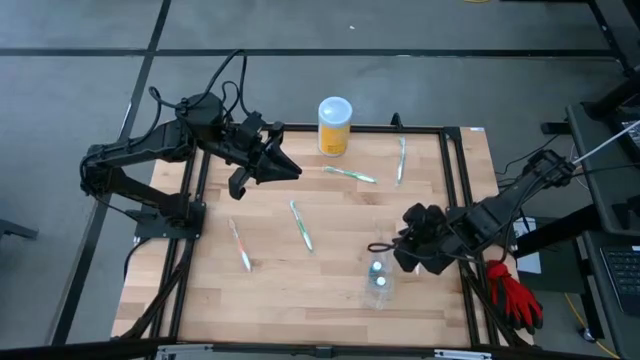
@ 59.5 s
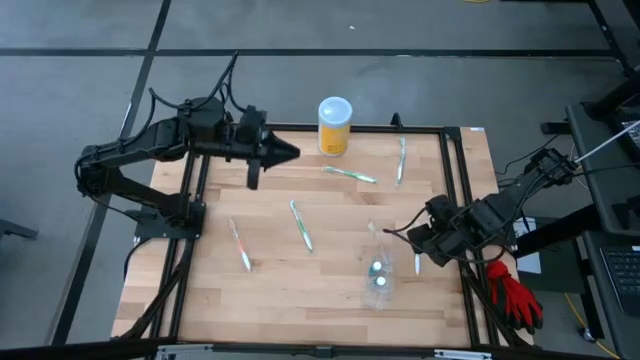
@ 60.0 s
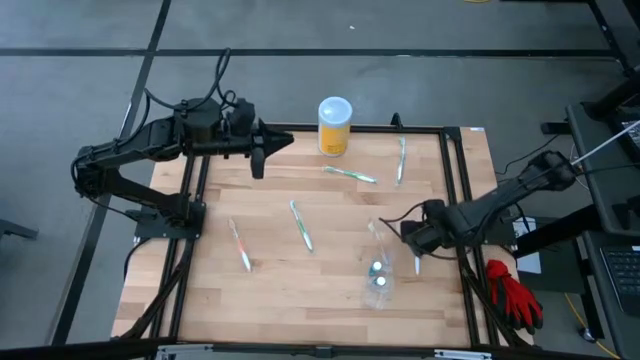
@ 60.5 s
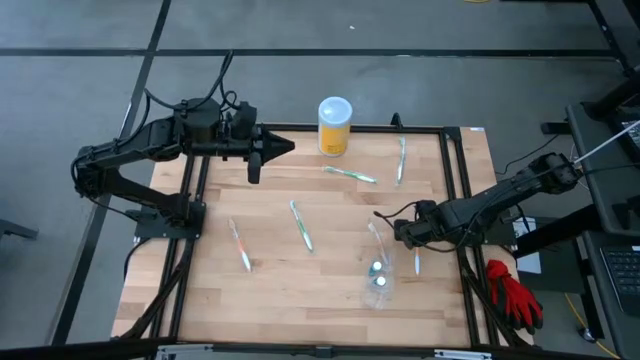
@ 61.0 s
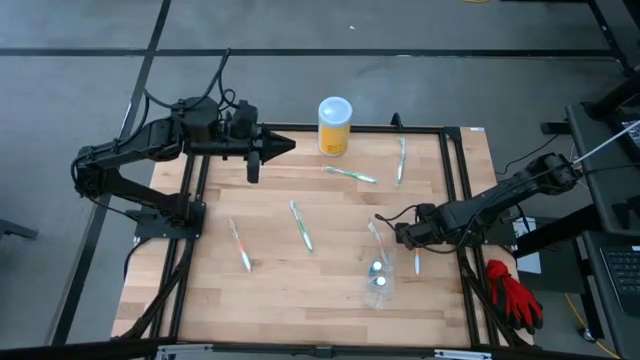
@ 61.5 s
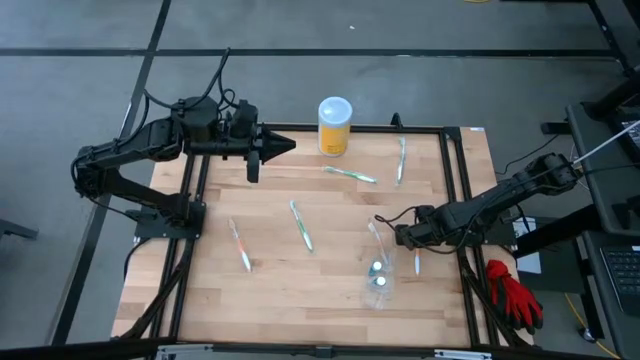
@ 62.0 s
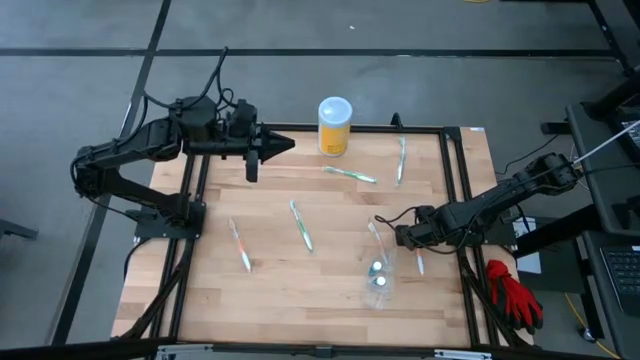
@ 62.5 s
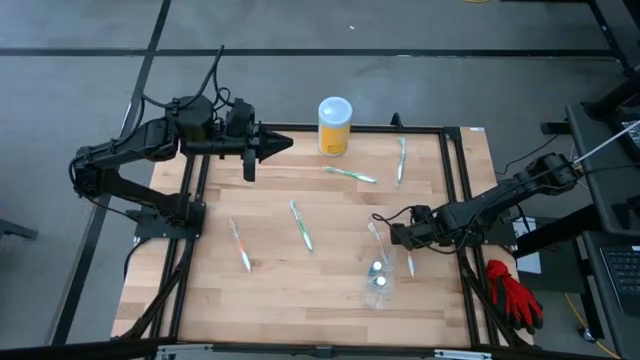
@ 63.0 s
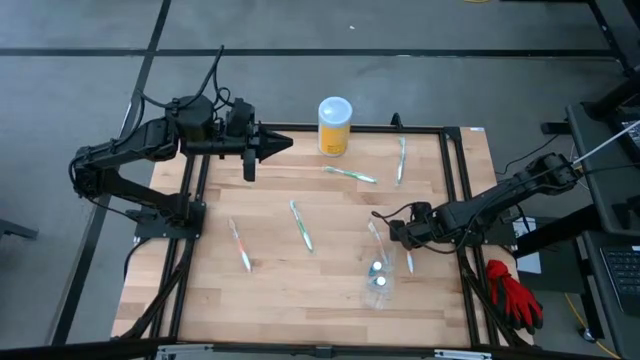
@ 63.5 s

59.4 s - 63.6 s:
Task: Pick & Place toothbrushing station
Put the right orange toothbrush into the transparent organizer

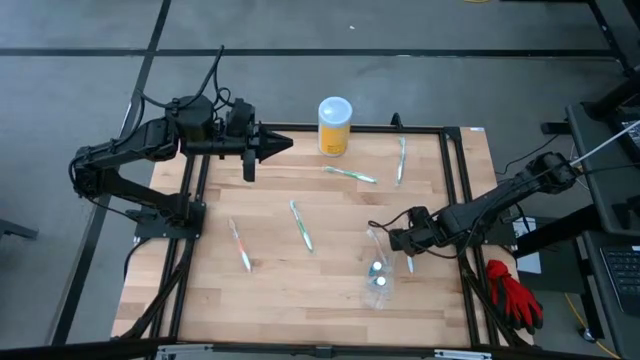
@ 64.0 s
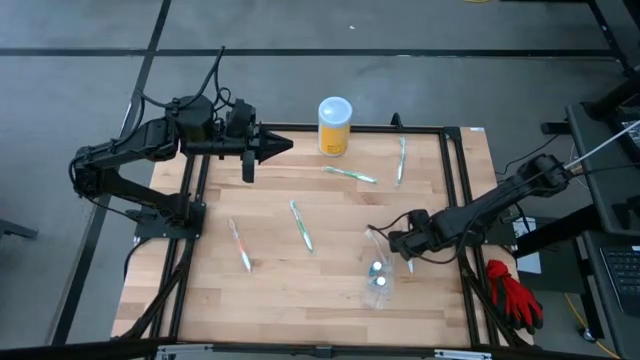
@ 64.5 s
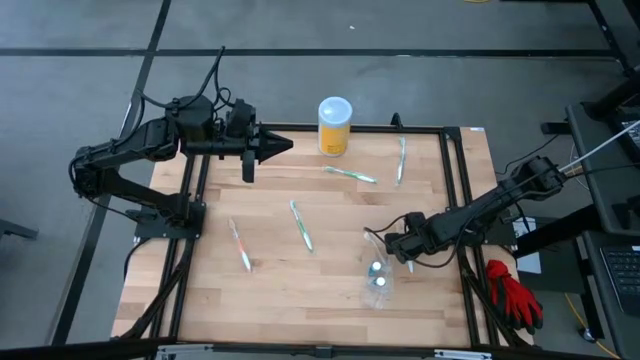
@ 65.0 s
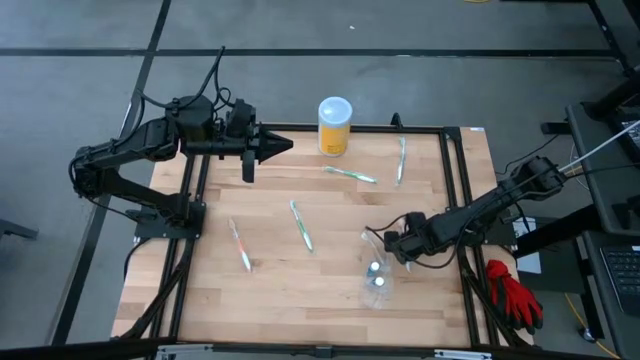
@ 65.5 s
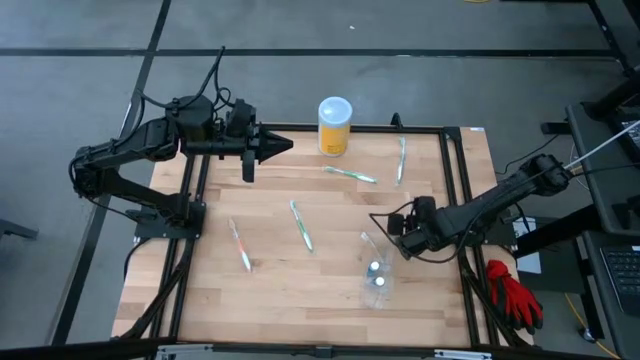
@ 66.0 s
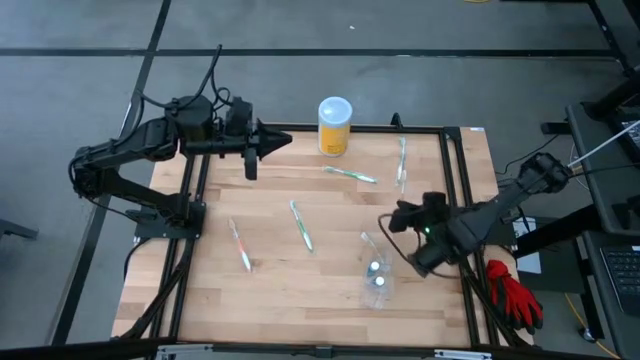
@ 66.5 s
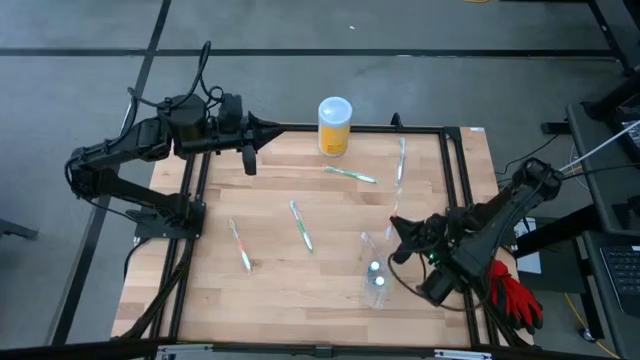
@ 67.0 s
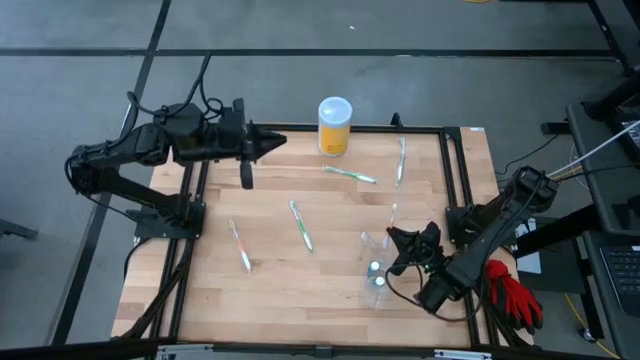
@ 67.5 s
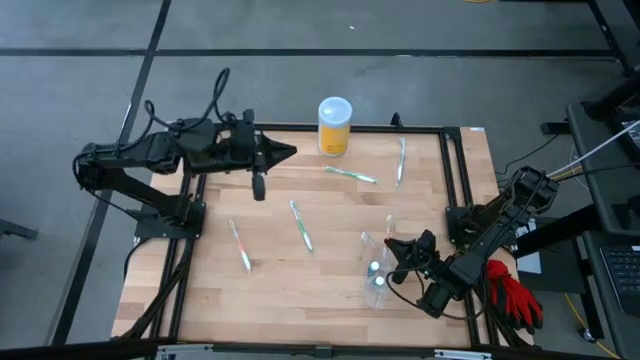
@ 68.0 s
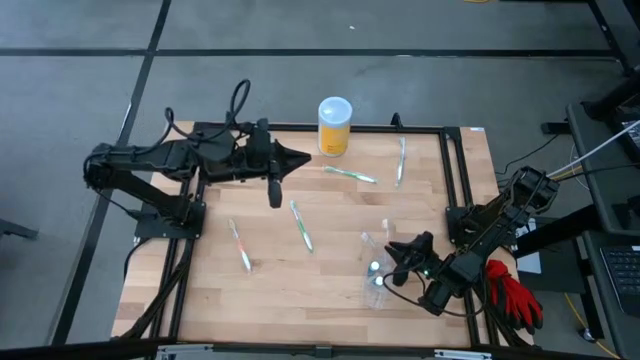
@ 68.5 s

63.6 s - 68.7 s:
Put the right orange toothbrush into the transparent organizer

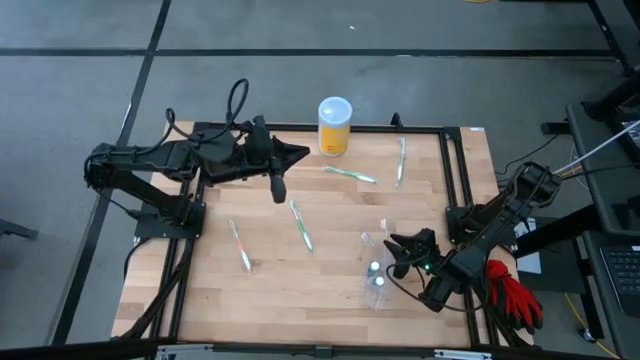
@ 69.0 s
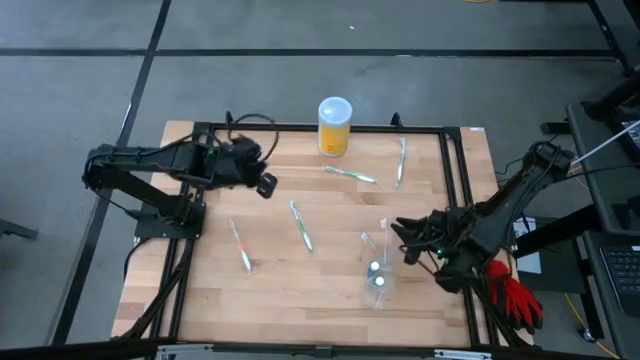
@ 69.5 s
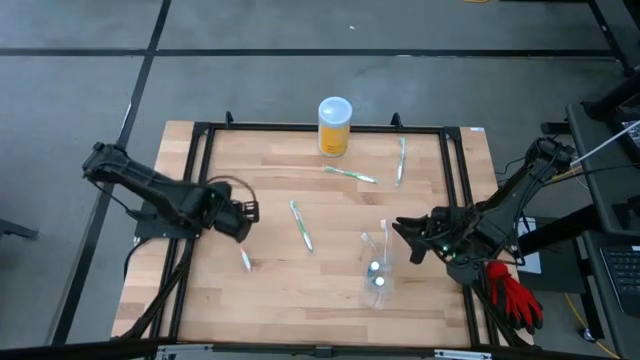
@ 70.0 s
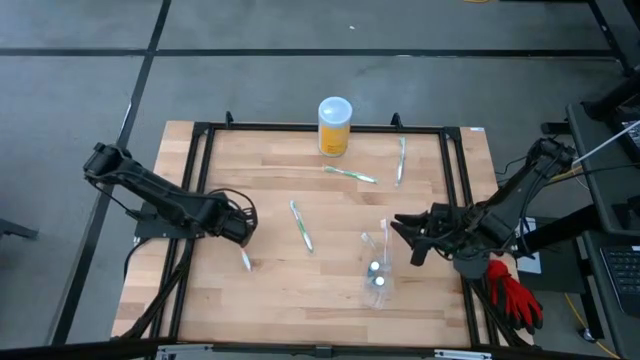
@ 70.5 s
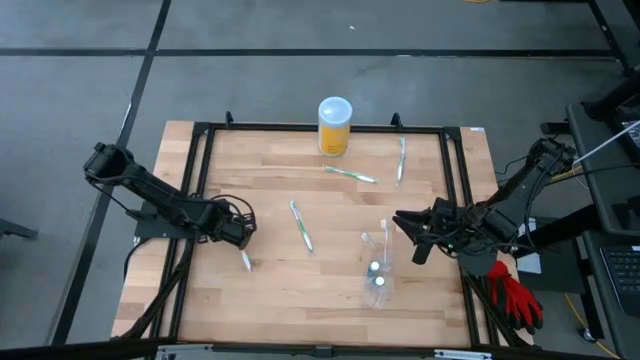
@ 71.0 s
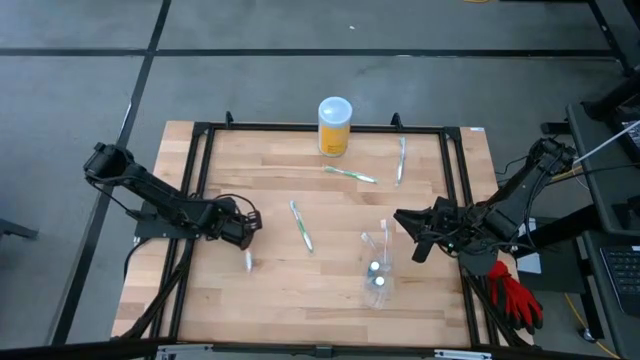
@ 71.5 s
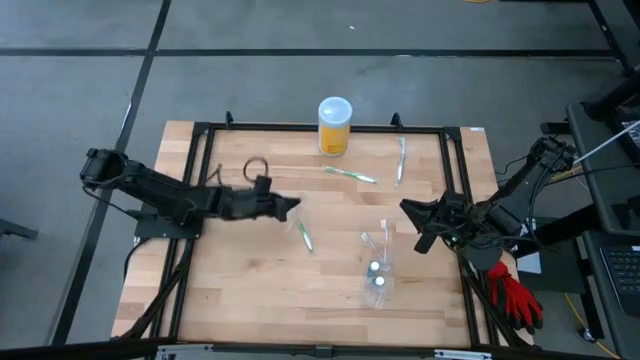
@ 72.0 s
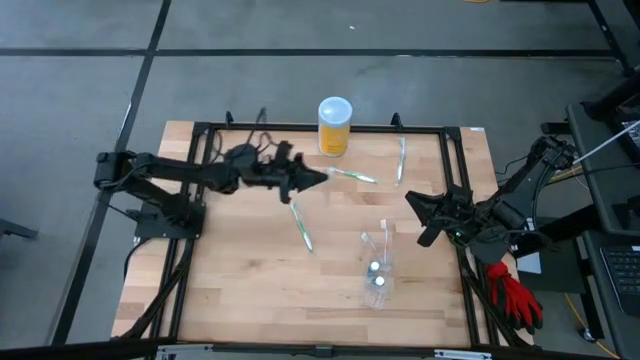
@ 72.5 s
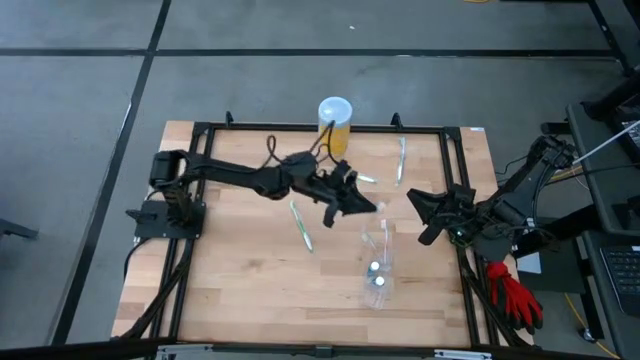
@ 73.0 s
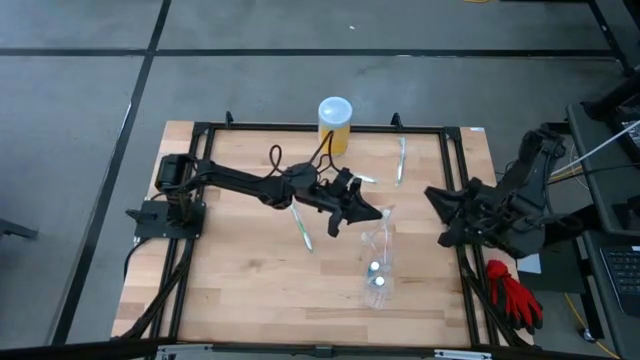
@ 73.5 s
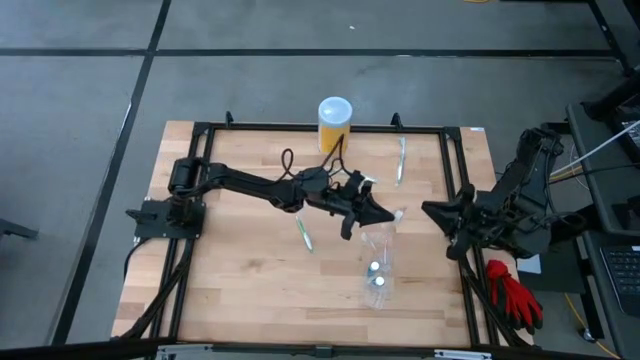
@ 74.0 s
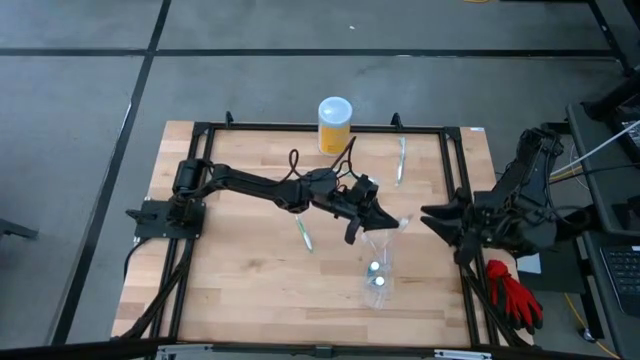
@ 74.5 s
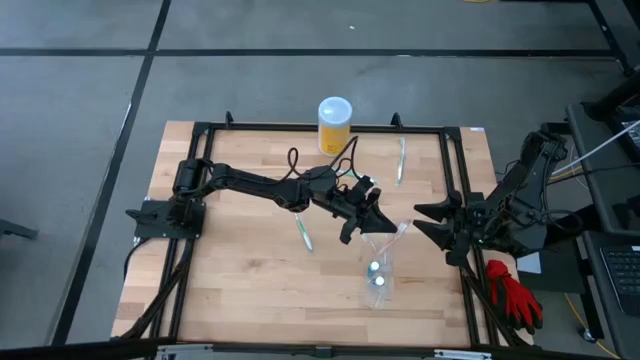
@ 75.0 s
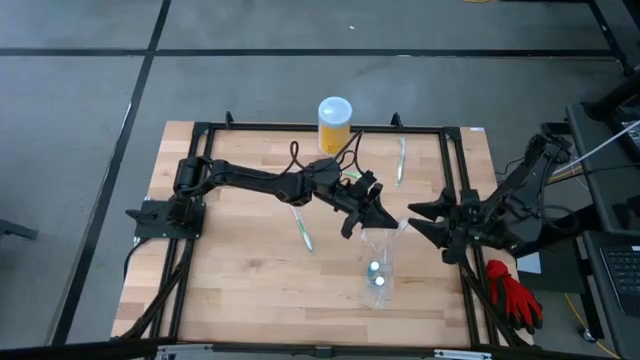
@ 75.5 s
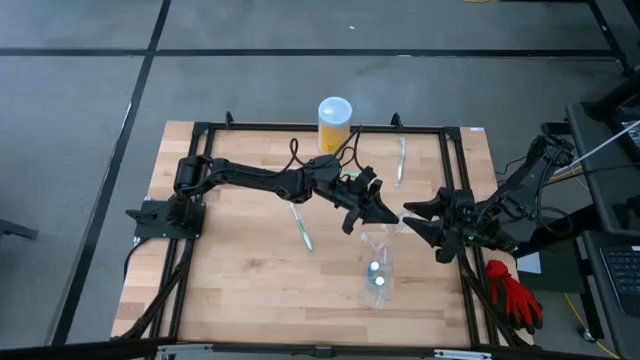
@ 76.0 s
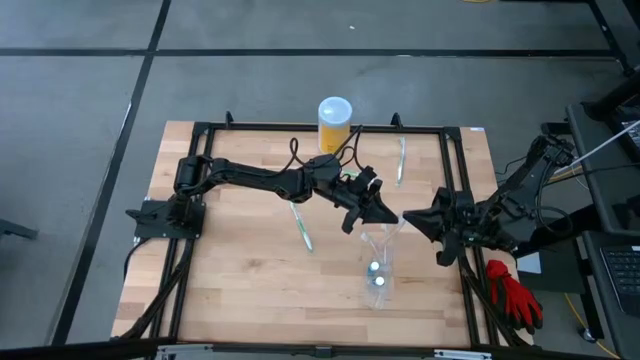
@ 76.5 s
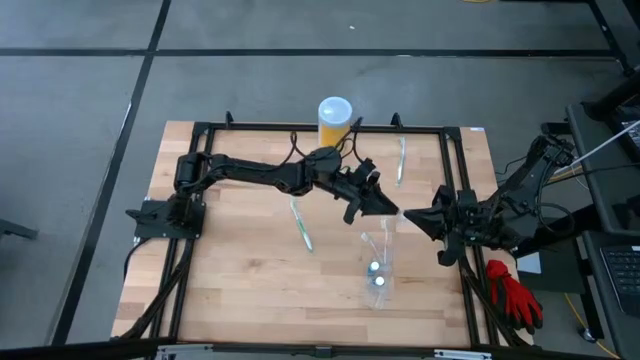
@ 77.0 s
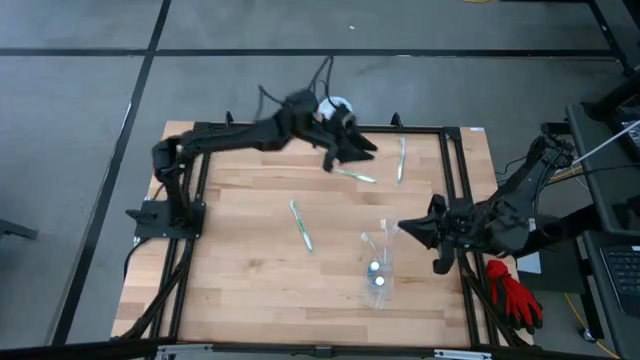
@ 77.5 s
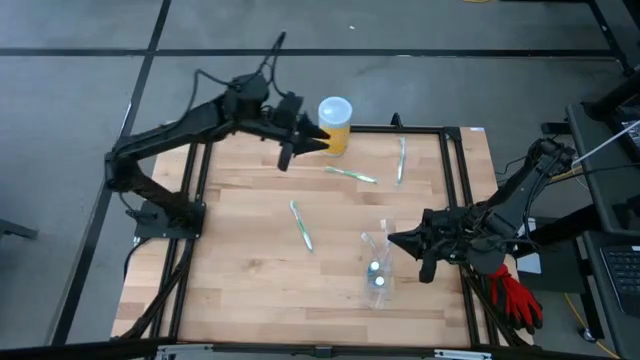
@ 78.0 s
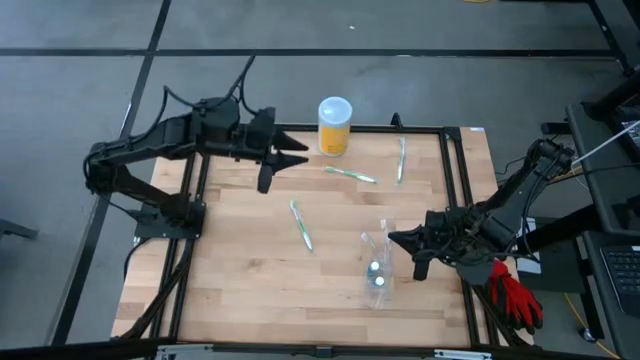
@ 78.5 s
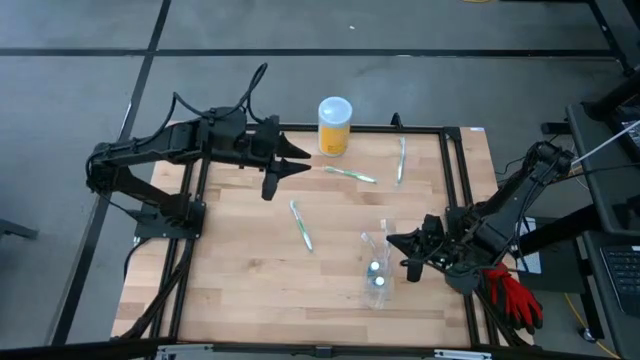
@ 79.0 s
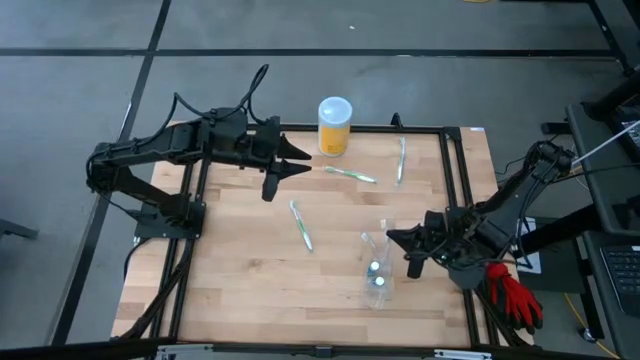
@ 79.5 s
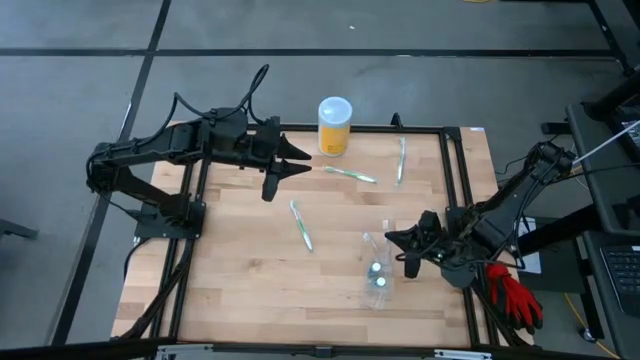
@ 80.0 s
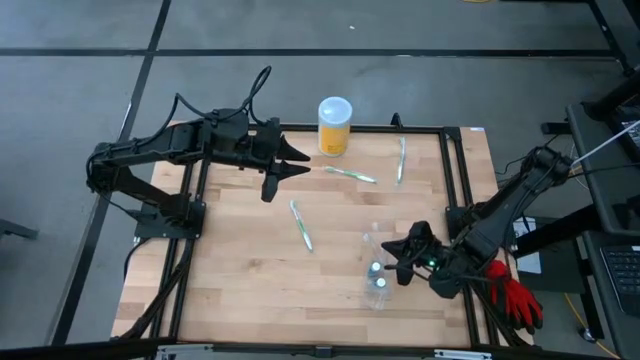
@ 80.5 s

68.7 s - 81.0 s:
Put the orange toothbrush into the transparent organizer
